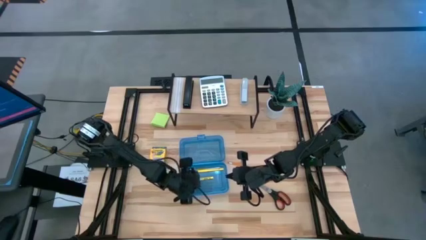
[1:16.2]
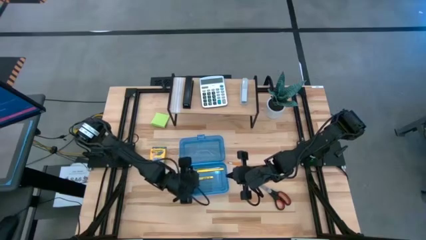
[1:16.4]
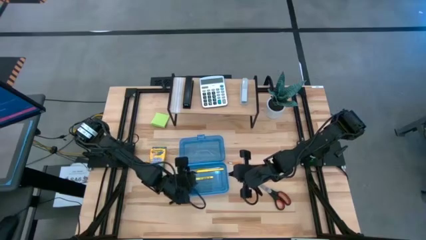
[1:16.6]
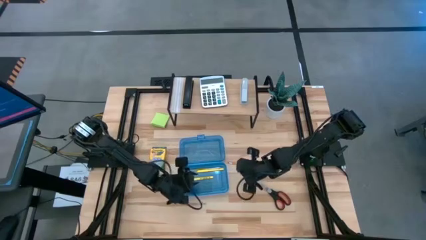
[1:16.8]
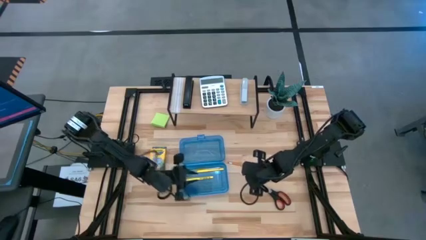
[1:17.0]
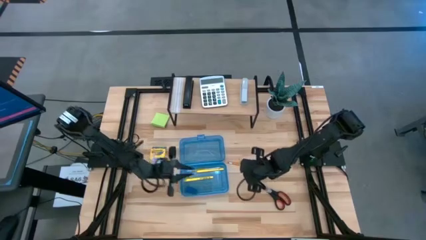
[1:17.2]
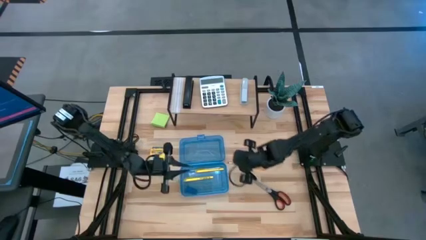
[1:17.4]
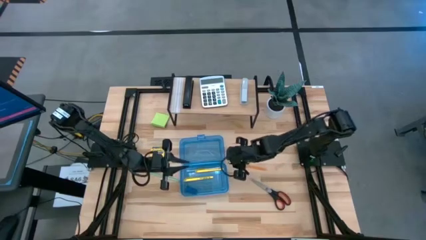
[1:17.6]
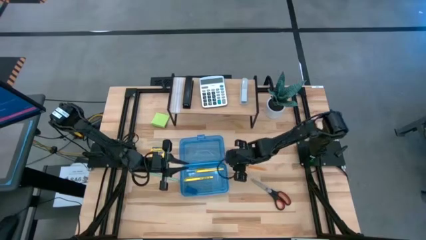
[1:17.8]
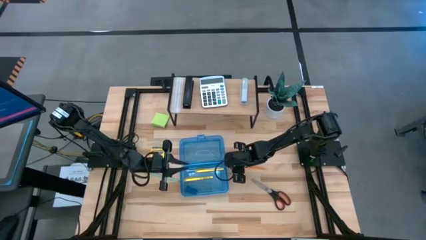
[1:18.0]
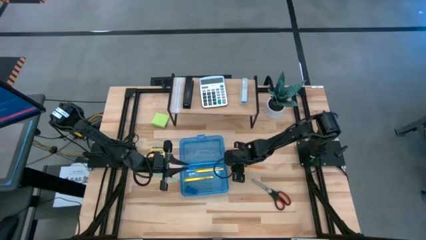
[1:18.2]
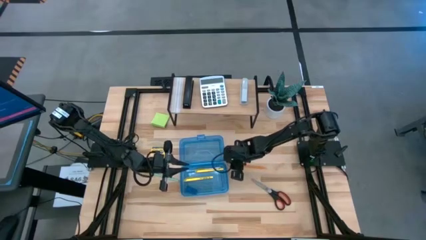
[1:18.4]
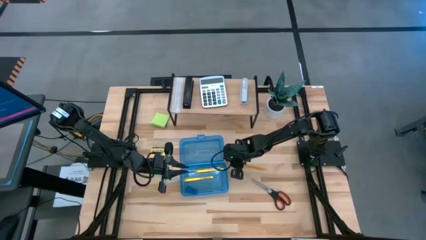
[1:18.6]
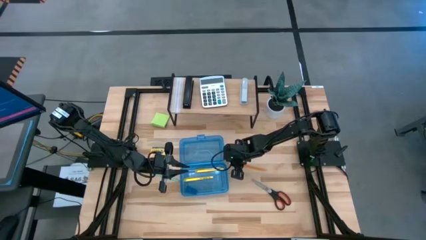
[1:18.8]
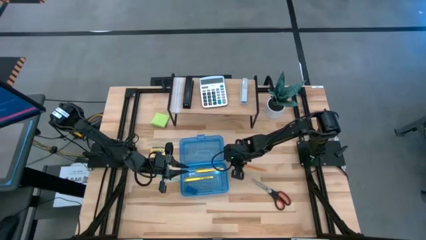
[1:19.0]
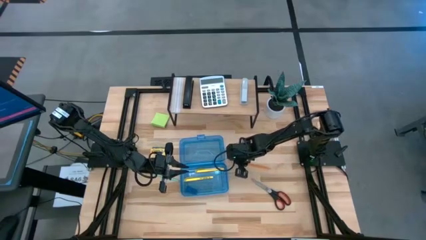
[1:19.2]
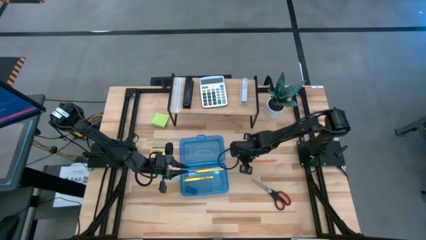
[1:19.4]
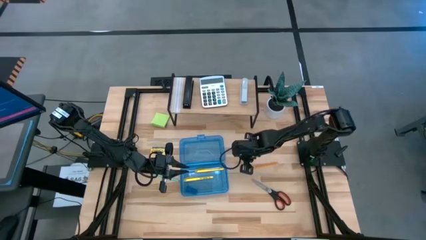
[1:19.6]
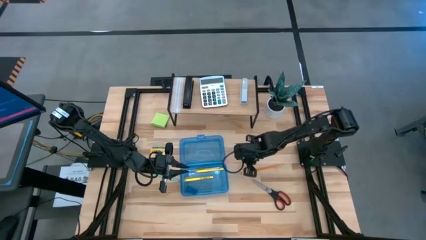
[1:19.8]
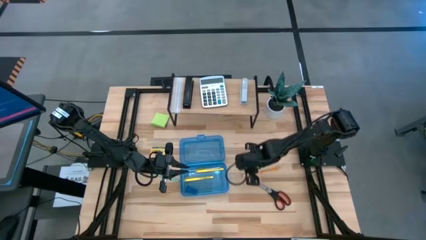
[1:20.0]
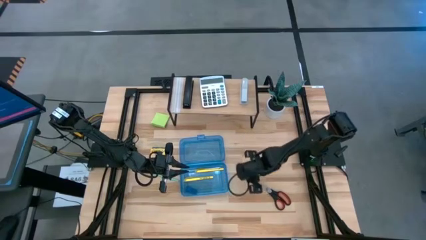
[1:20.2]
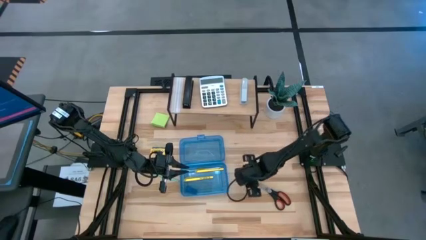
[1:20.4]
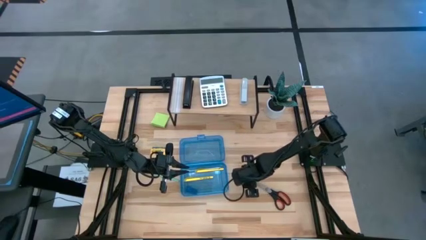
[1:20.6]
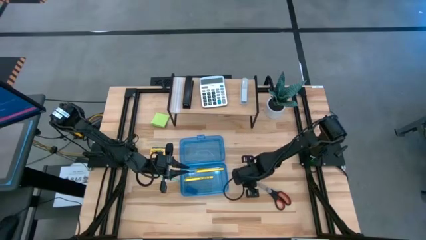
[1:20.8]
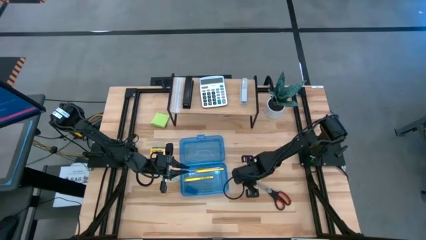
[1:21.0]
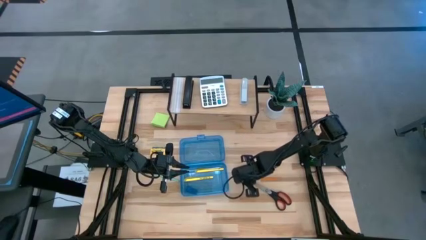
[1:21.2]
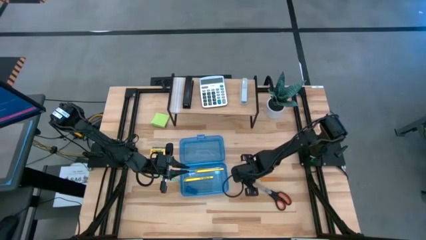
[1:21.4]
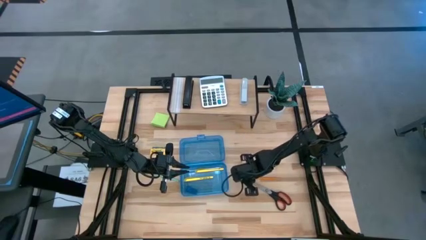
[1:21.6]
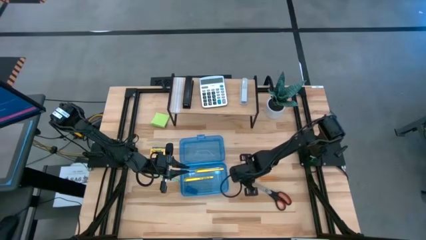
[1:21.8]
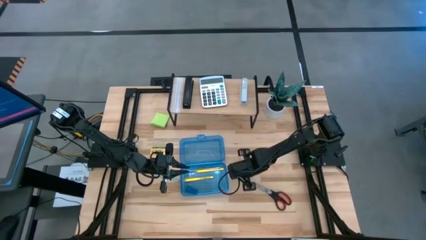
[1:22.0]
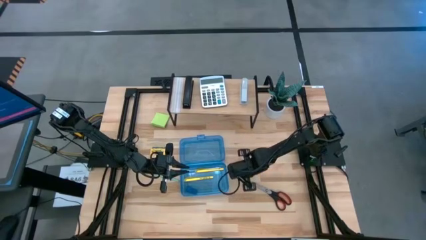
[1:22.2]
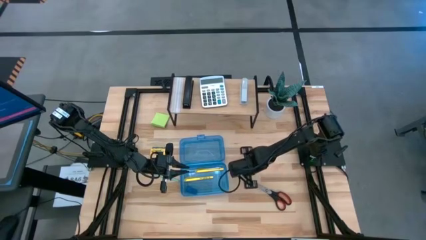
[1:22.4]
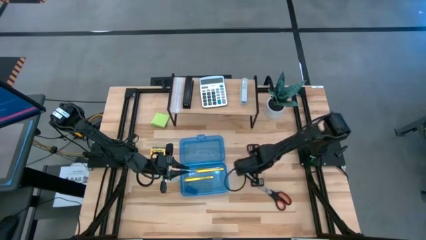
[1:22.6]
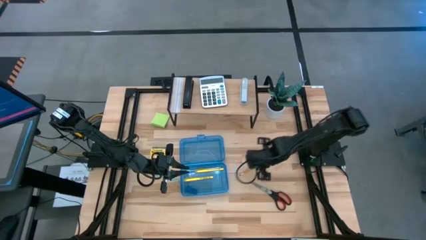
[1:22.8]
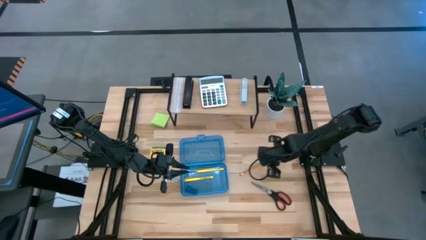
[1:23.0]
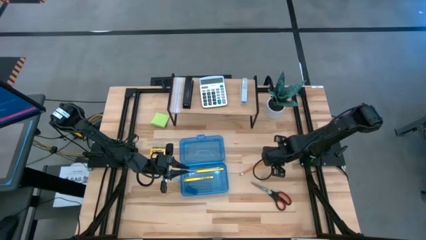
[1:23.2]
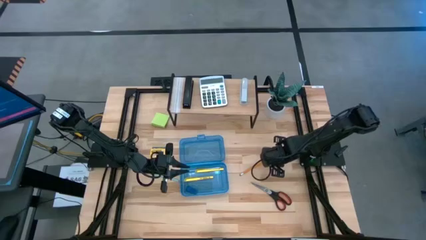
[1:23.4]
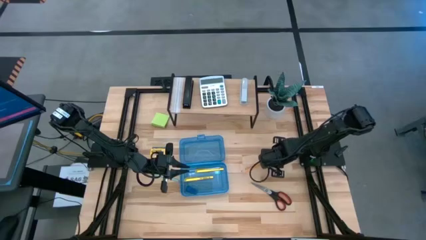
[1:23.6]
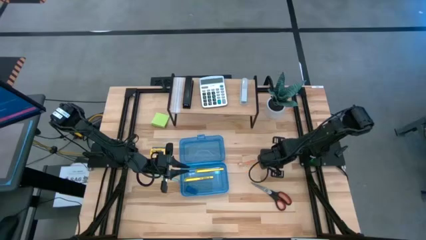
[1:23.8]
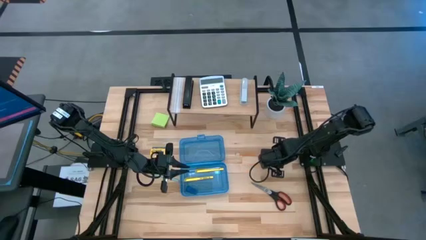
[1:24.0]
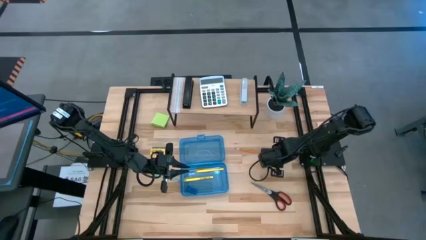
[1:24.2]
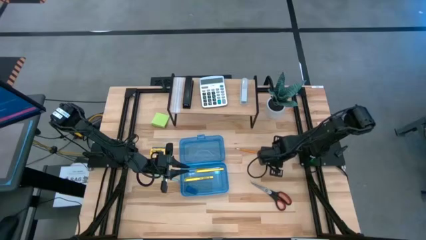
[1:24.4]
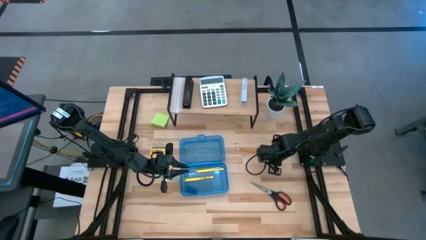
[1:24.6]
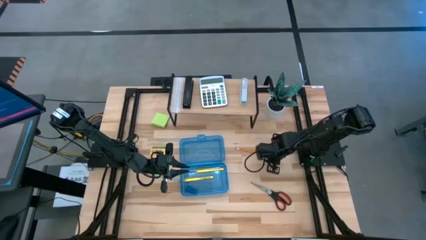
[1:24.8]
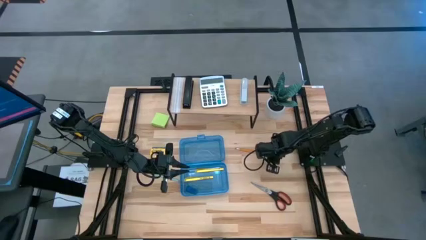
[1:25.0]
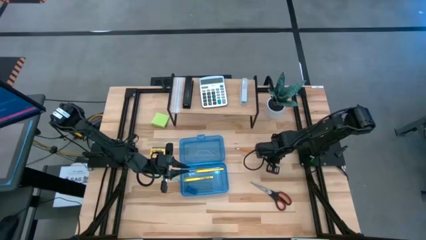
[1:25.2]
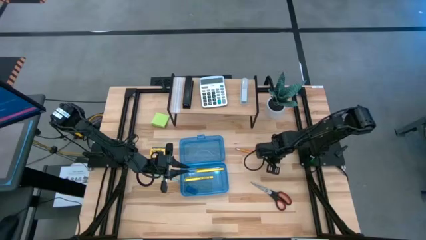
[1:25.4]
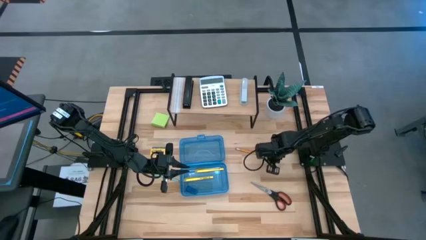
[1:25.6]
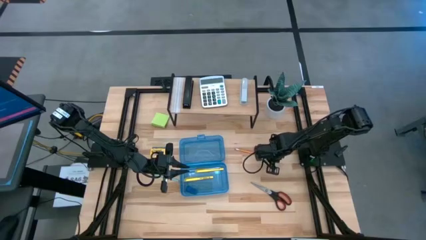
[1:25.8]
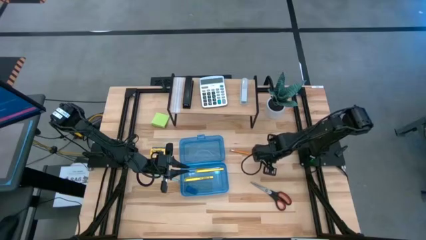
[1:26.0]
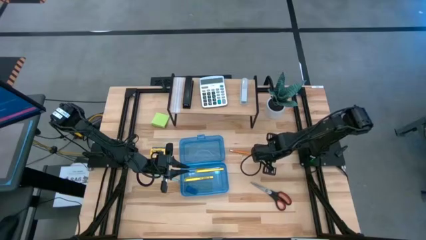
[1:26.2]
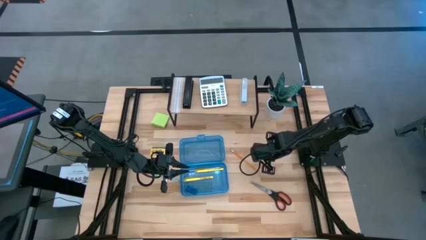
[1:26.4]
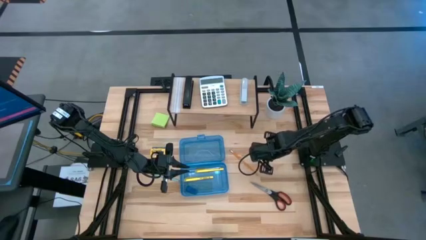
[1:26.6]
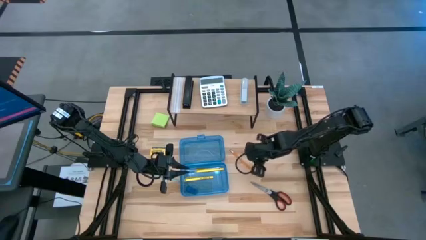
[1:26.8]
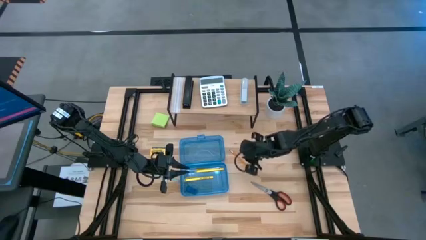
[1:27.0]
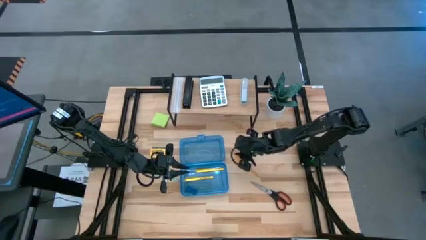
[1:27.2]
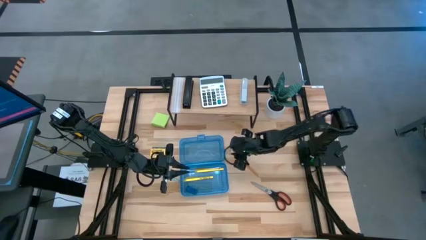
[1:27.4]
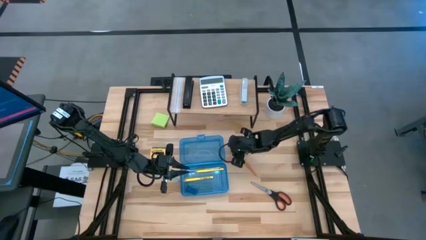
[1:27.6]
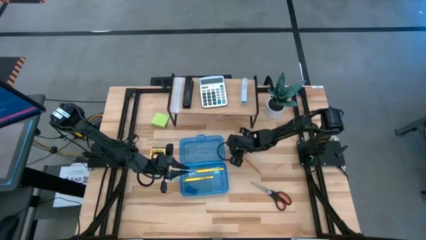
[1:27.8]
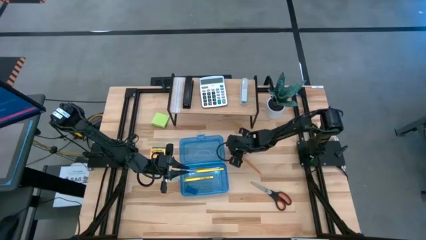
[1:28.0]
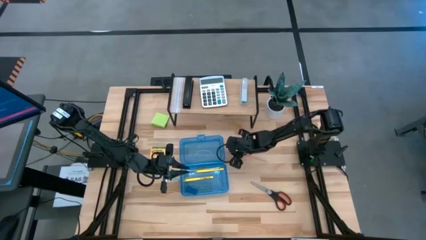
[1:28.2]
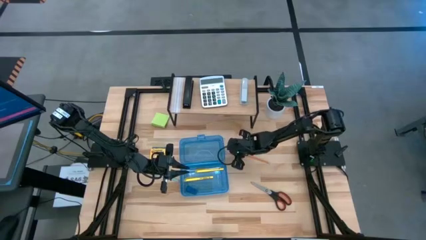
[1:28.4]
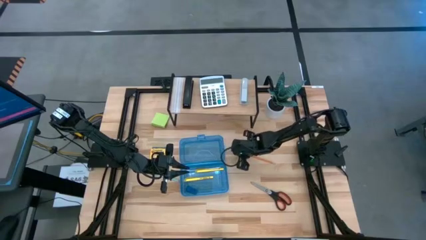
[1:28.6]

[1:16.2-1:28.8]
Task: Pack school essentials
Put the orange pencil into the blue supply box

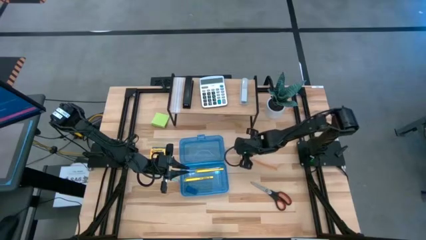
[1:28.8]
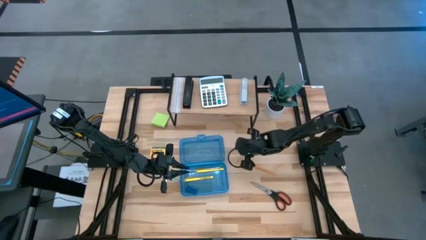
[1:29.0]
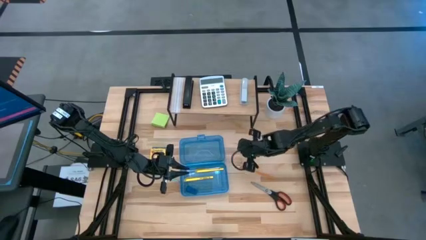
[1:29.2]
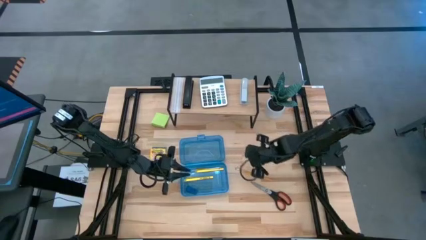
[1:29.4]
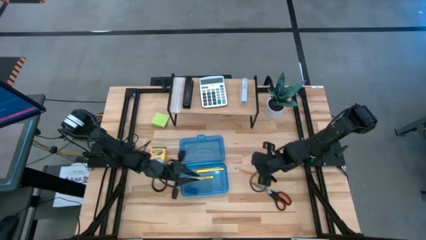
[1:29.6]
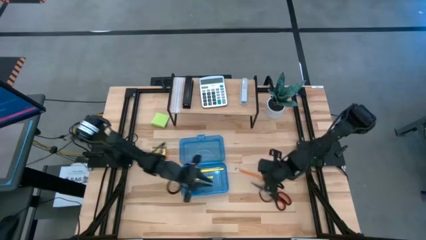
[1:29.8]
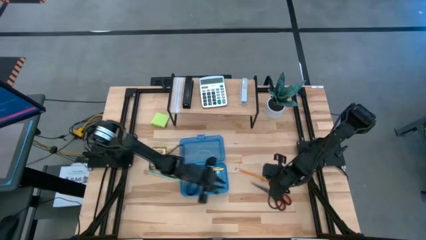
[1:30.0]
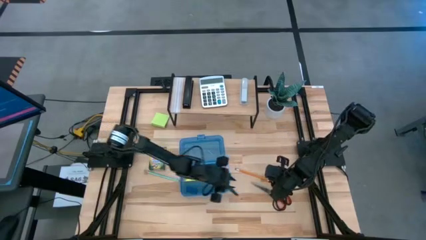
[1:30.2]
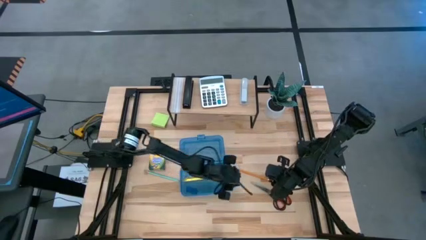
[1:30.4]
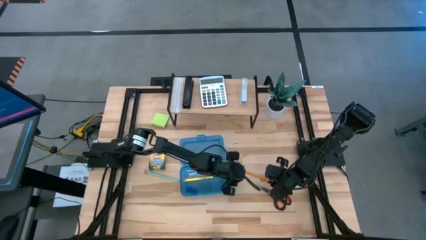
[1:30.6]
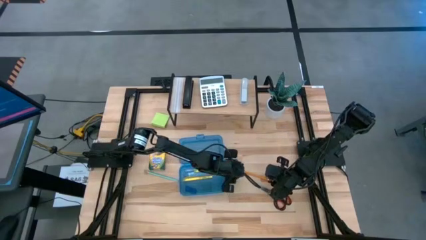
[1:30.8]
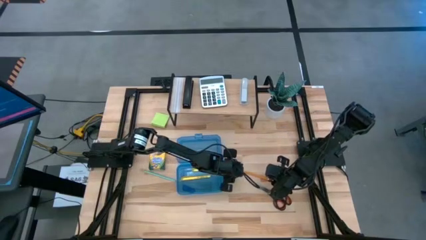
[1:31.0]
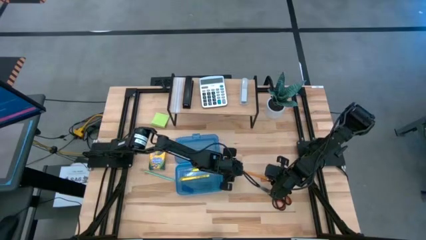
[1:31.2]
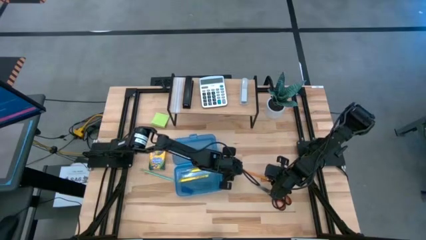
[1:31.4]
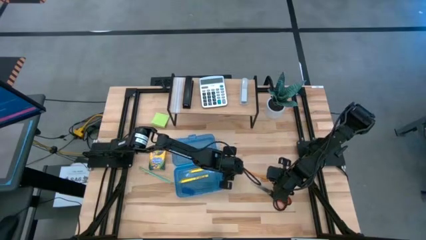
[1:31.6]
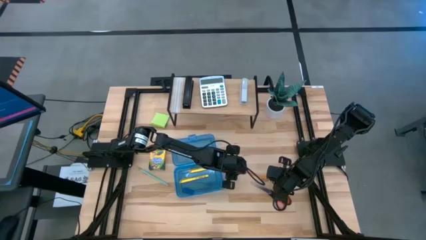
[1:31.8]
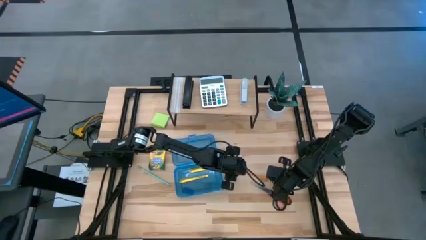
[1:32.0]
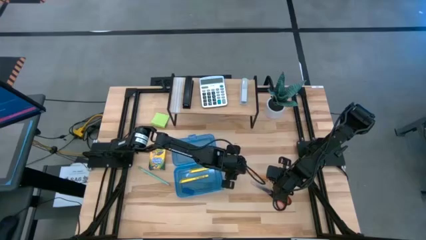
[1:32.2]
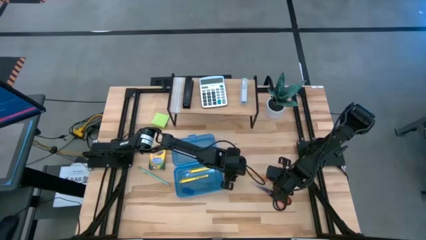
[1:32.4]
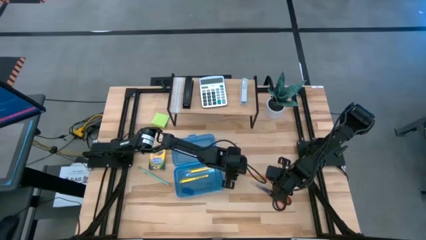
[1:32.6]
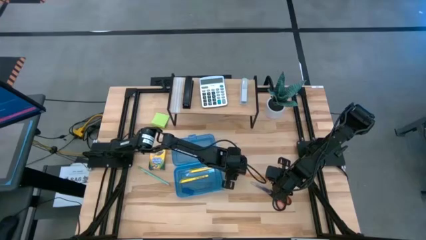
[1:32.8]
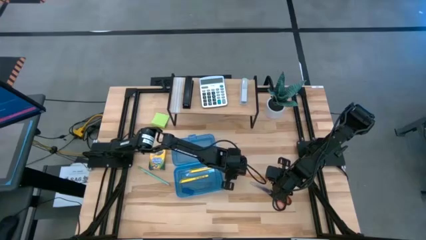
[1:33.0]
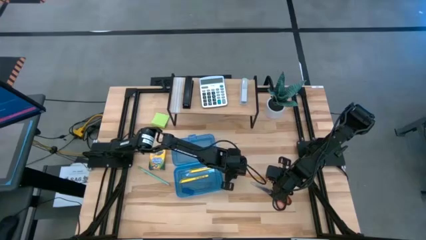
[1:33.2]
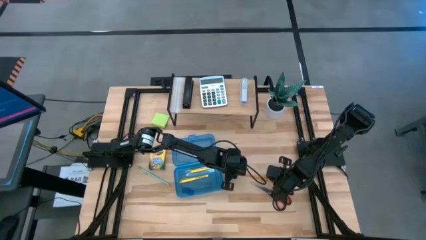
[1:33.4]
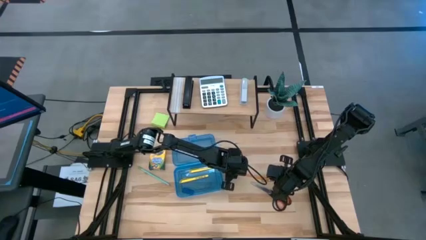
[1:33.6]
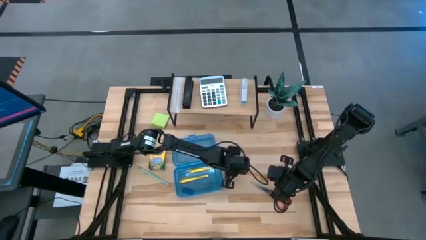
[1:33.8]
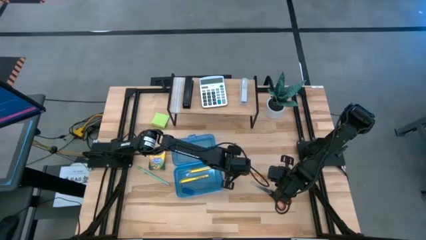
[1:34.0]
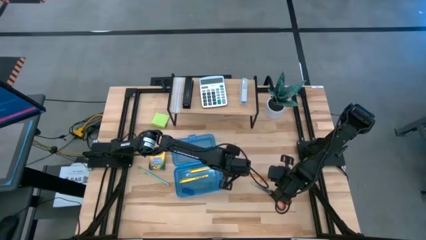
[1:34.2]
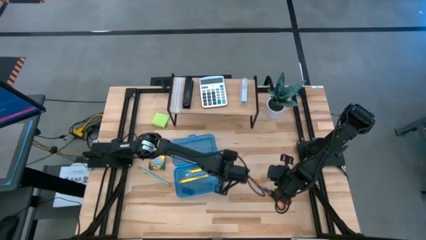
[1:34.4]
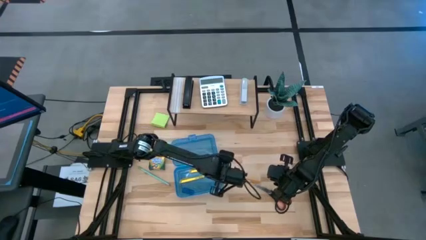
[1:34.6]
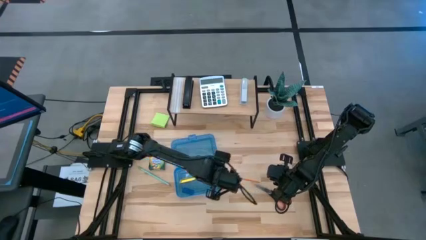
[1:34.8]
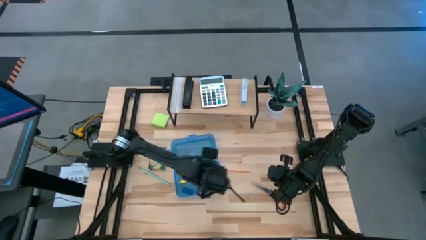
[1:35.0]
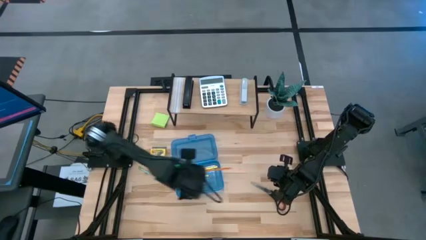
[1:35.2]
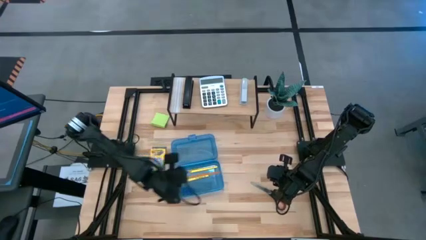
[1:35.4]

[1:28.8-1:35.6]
Put the orange pencil into the blue supply box
